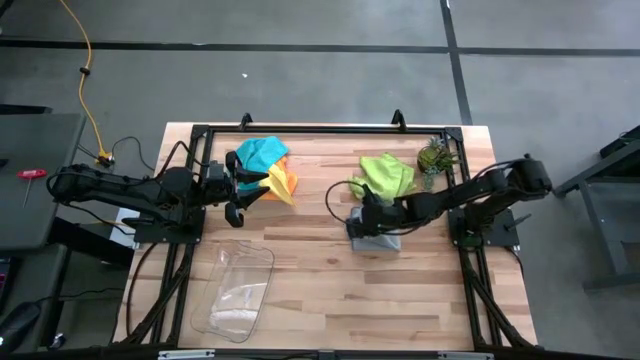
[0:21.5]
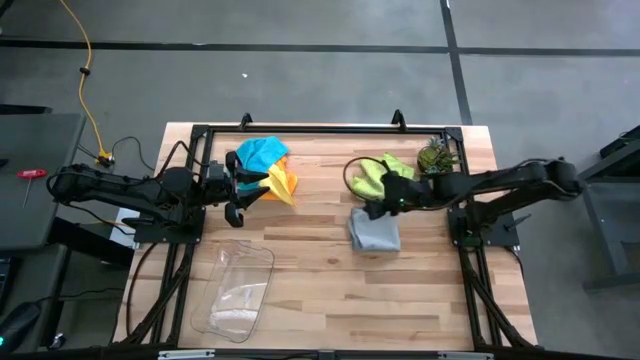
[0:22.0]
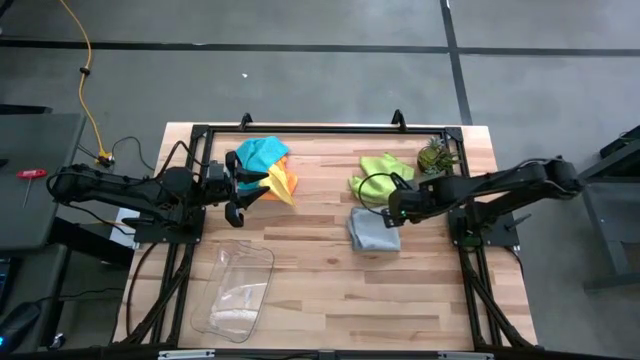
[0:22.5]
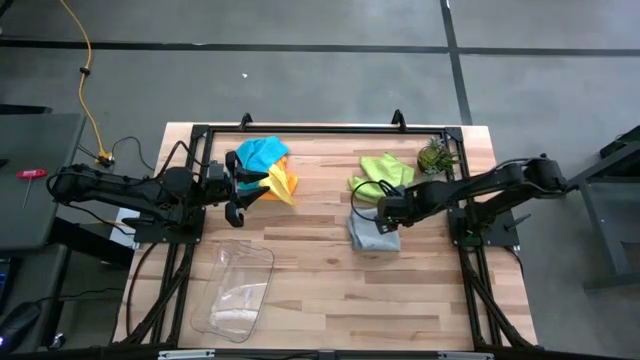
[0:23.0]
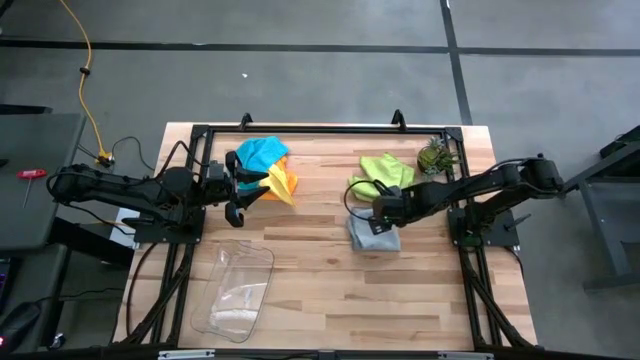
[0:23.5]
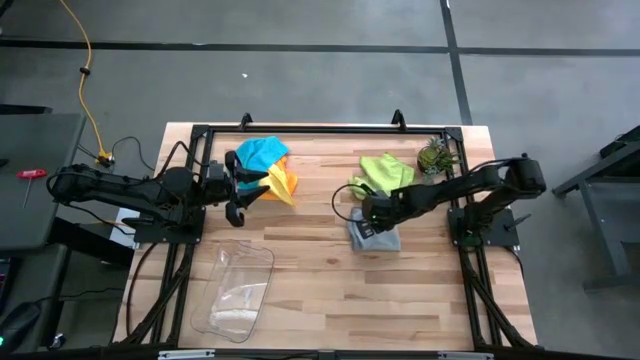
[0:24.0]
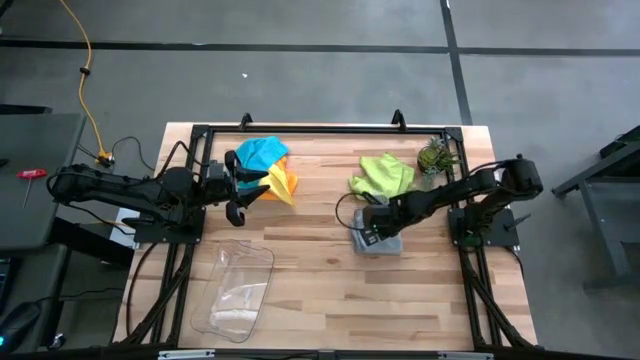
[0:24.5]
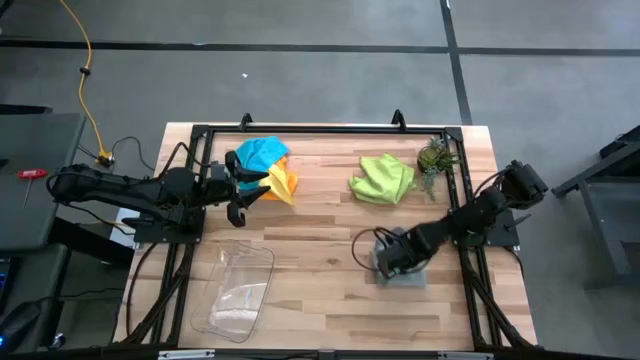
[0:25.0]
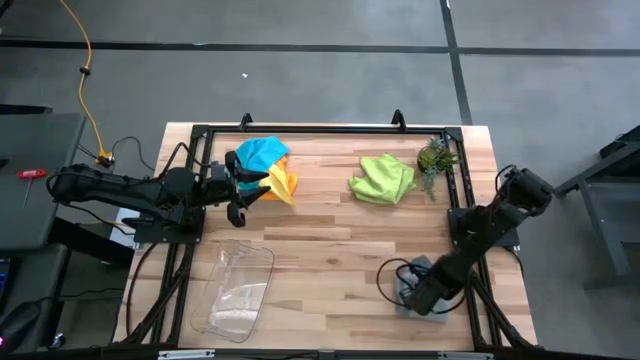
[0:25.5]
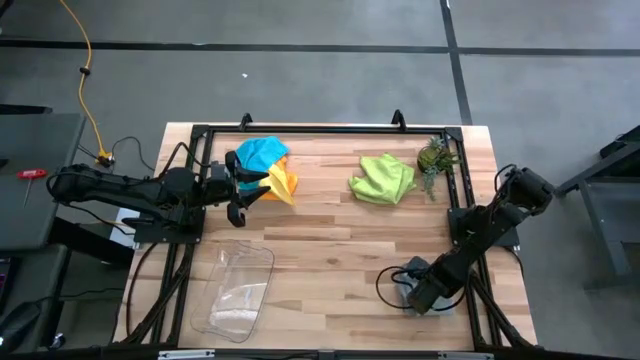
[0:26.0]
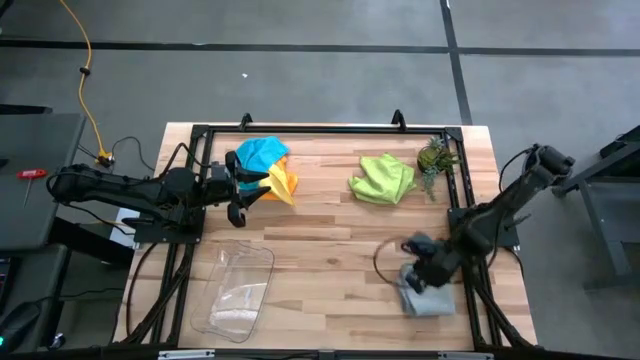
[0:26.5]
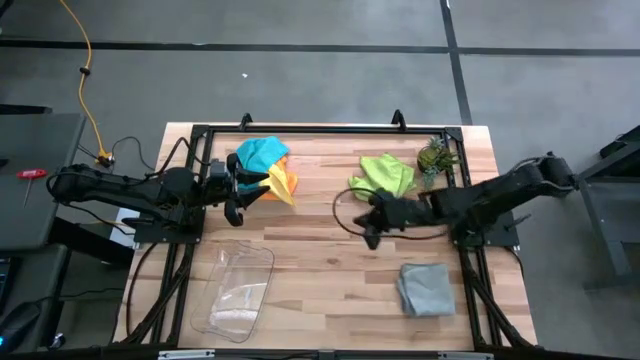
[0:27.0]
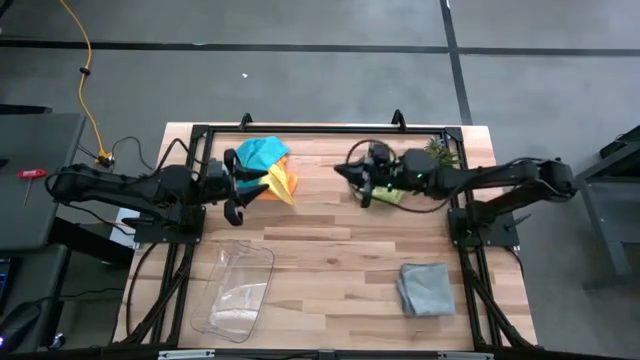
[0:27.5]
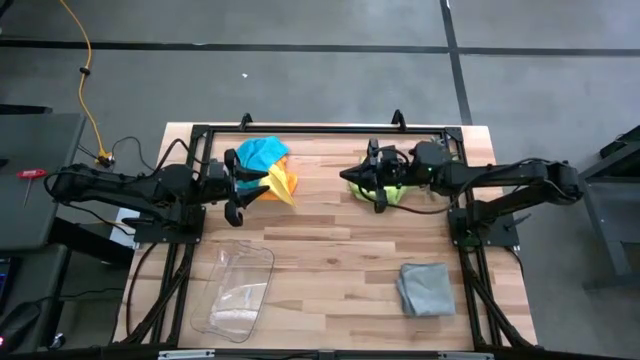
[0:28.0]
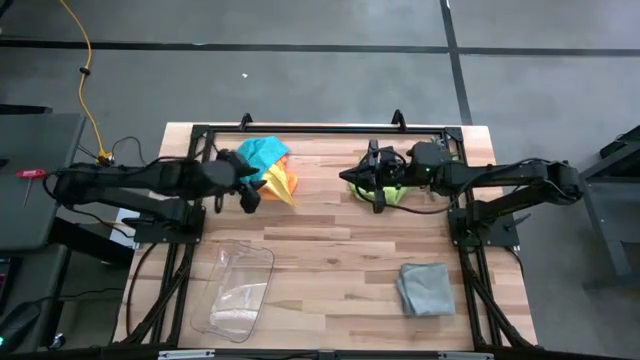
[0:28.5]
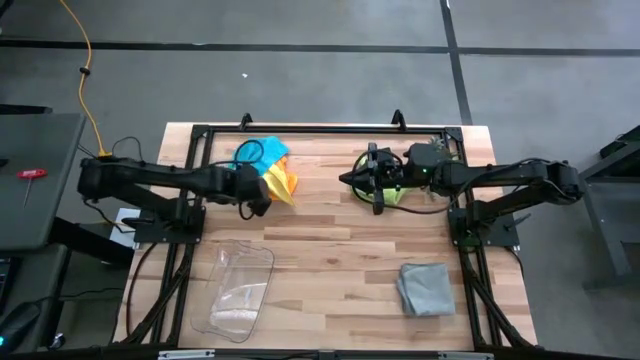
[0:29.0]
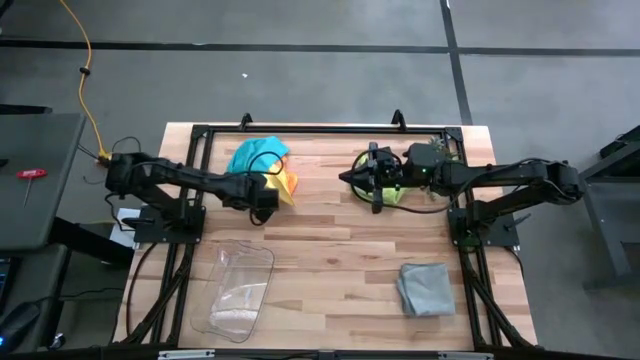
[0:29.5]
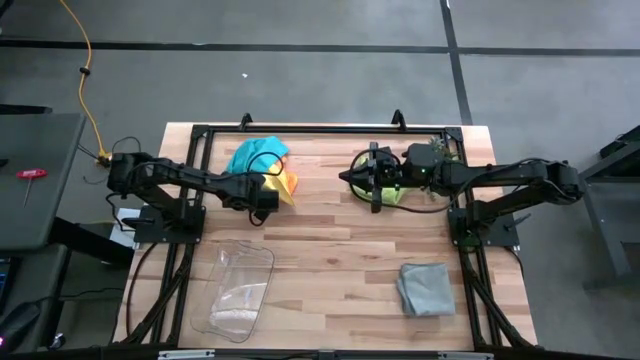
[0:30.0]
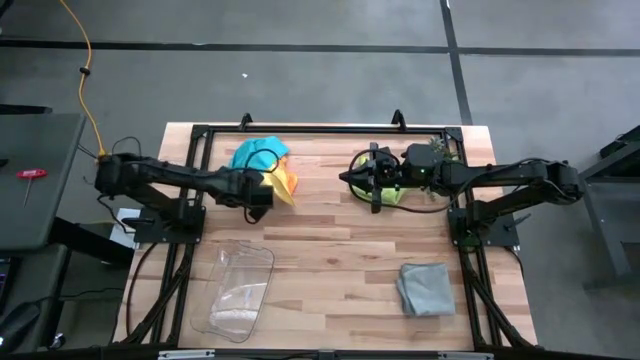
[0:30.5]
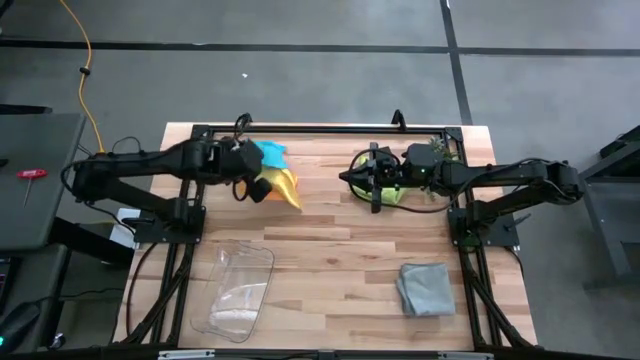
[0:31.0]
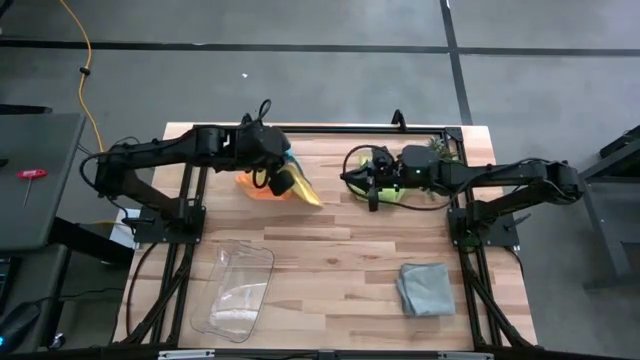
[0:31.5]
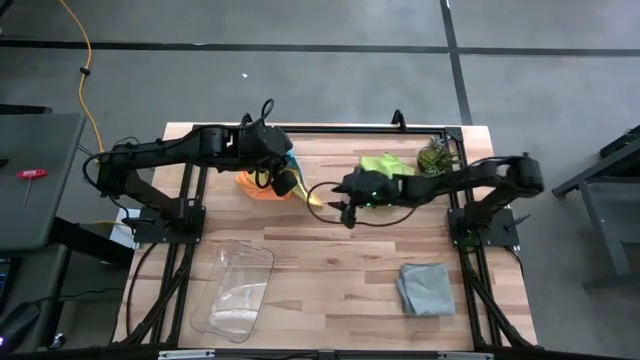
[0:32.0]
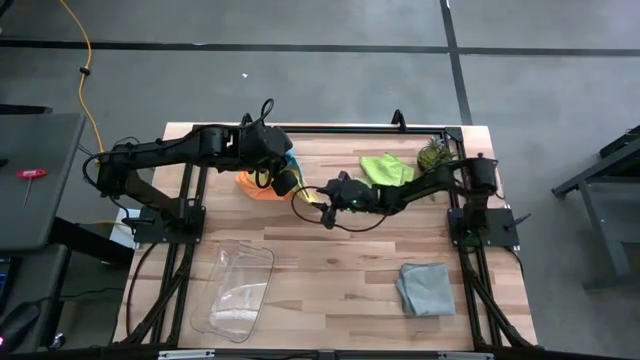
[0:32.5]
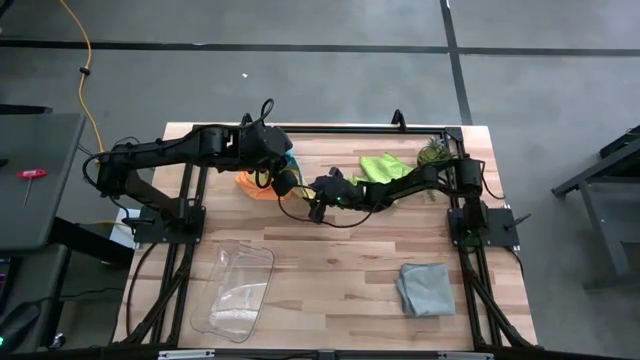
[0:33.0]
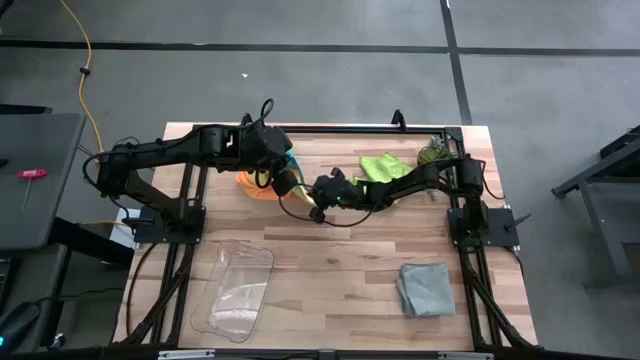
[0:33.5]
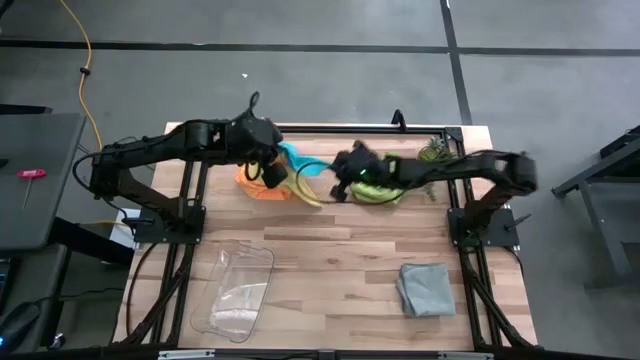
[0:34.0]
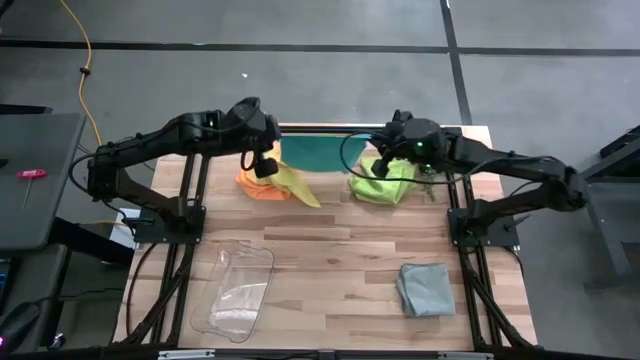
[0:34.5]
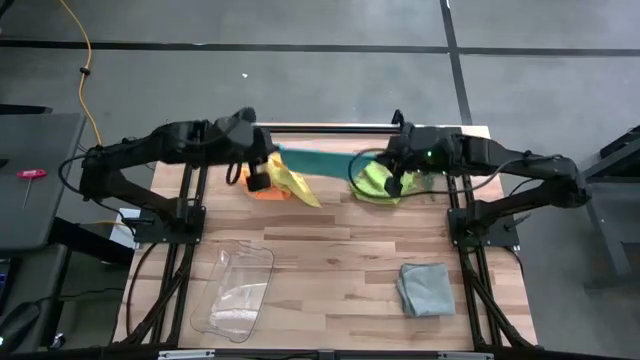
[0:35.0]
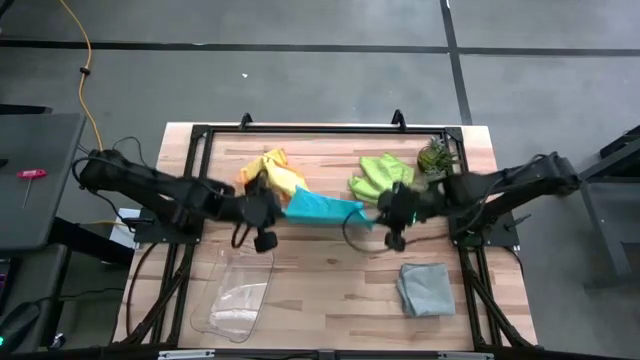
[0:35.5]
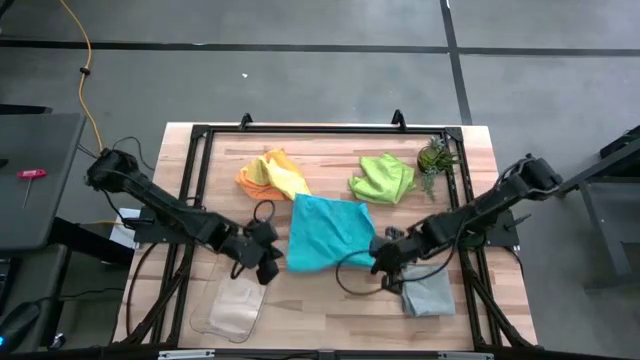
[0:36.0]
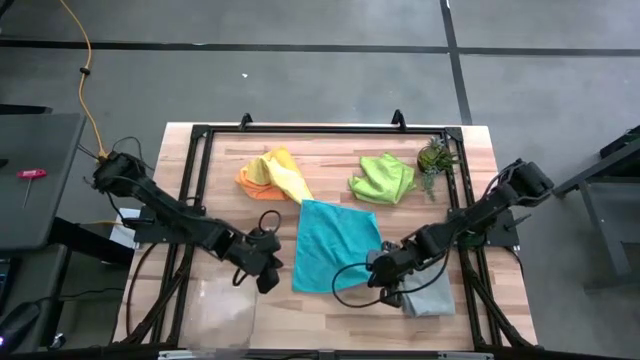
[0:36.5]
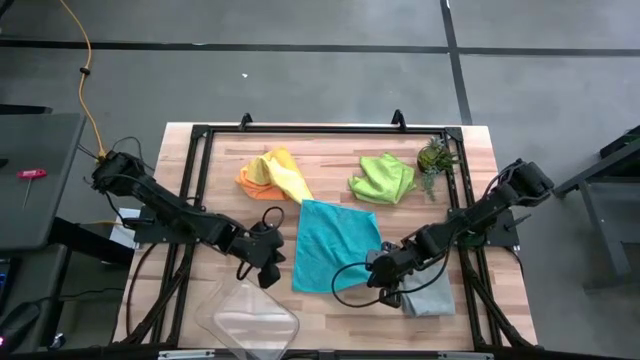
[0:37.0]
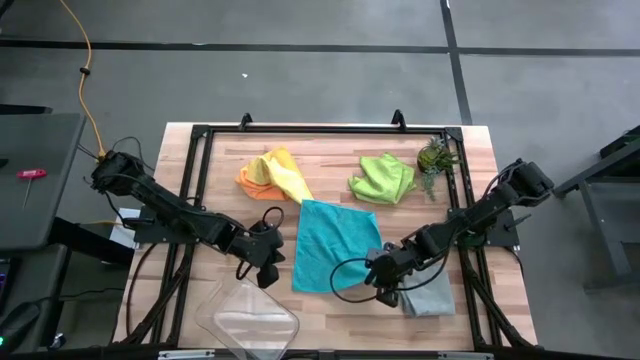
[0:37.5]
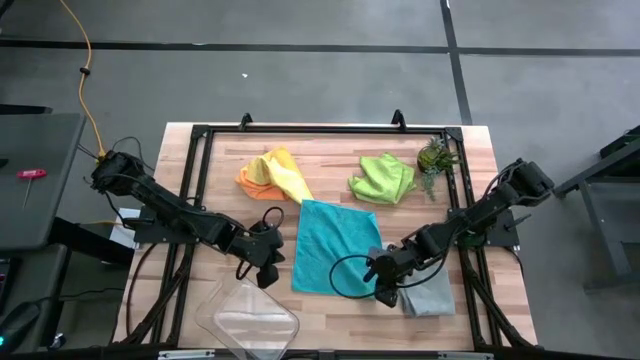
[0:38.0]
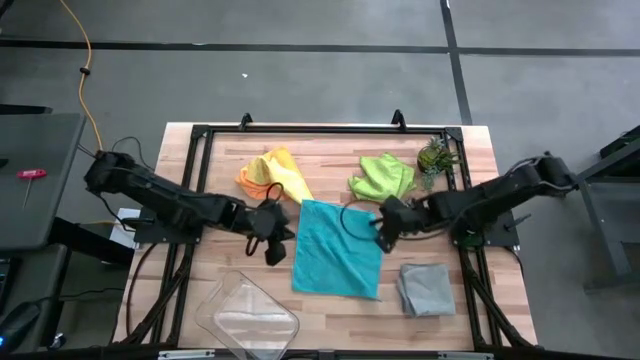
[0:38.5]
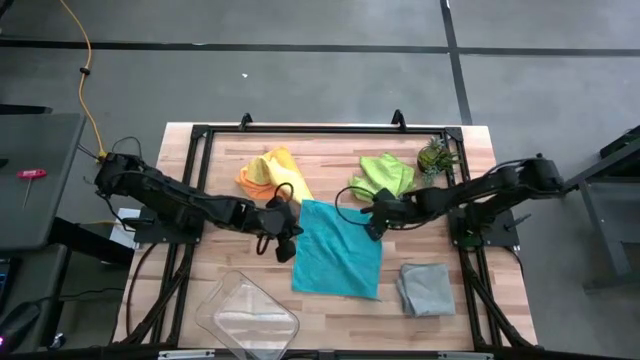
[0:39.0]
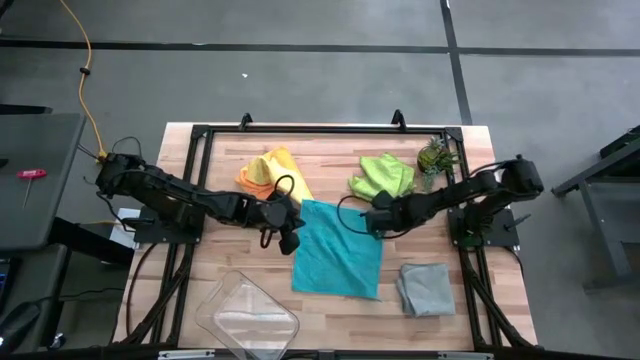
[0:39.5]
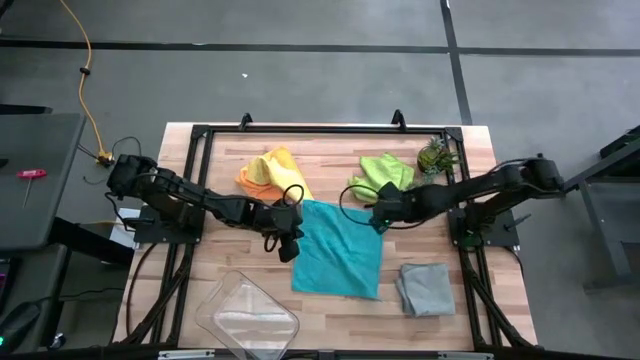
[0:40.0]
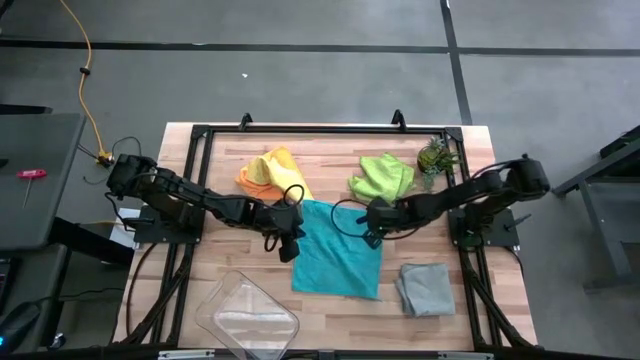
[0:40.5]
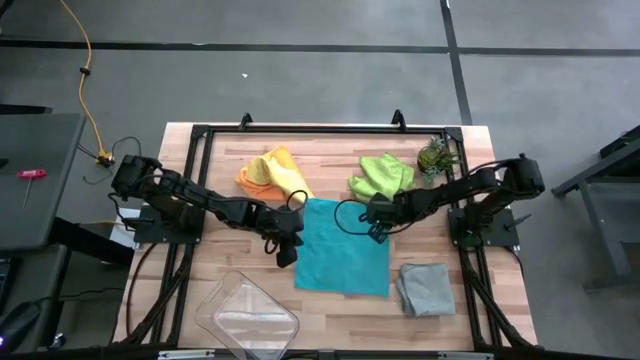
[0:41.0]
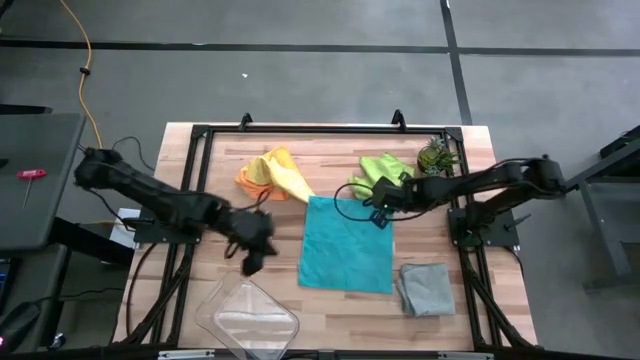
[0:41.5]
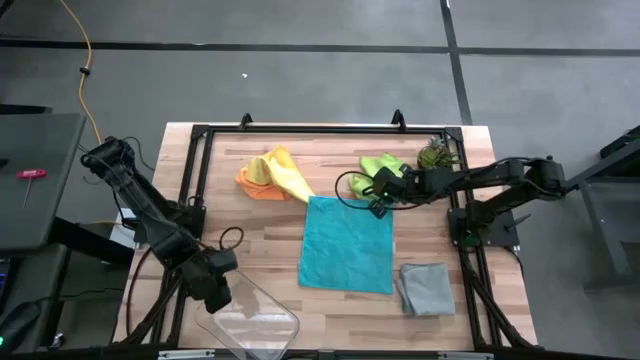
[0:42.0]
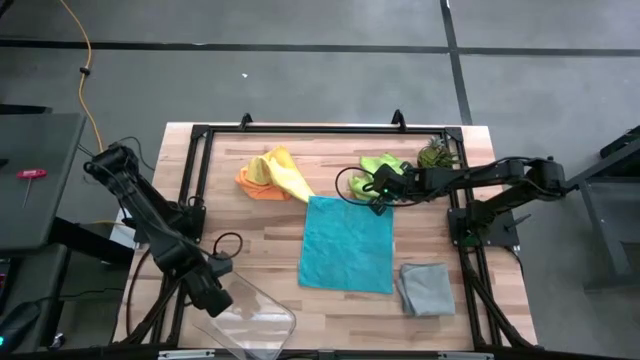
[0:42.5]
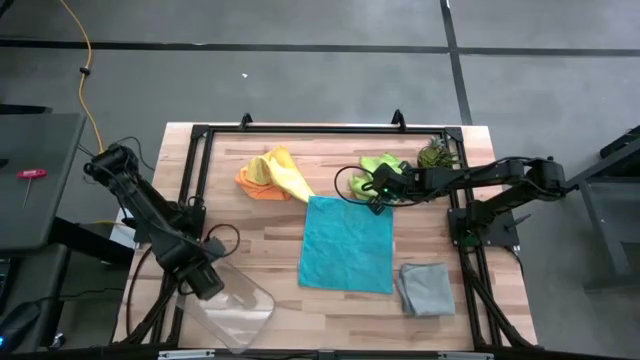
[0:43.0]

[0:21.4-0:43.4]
Task: Fold microfiber towels
Fold the blue microfiber cloth

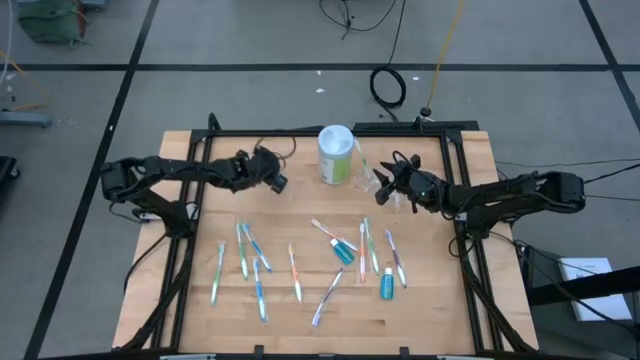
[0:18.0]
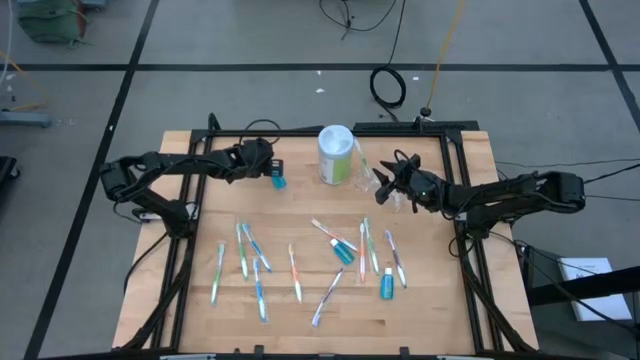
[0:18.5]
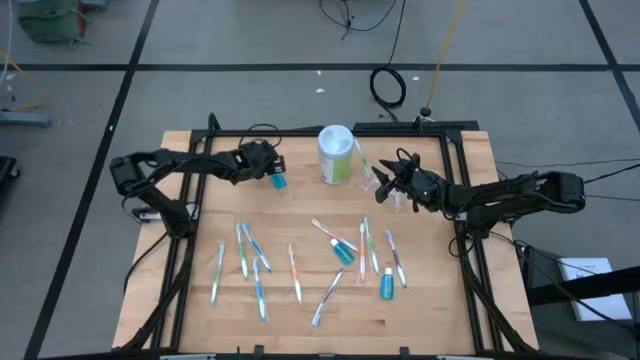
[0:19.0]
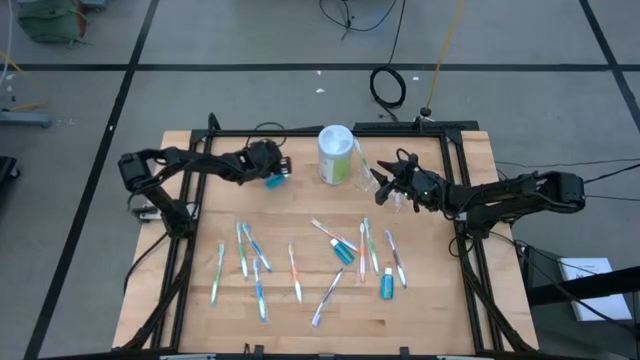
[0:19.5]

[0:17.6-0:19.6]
Task: Pick & Place toothbrushing station
Put the blue mouthwash into the transparent organizer
